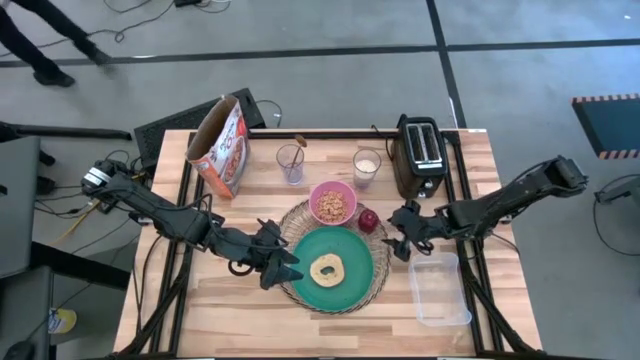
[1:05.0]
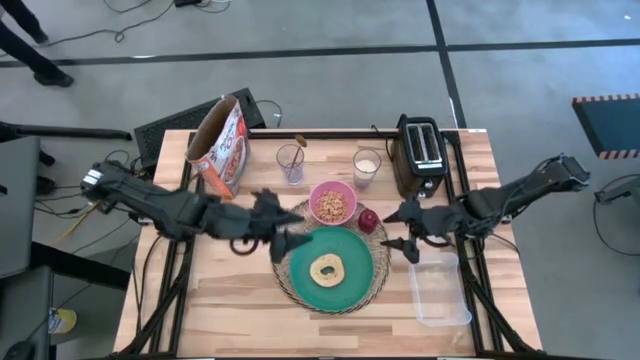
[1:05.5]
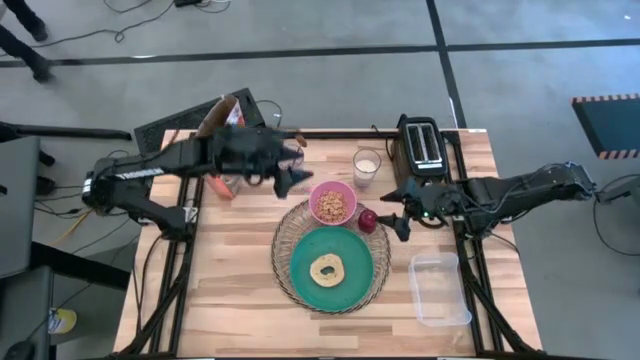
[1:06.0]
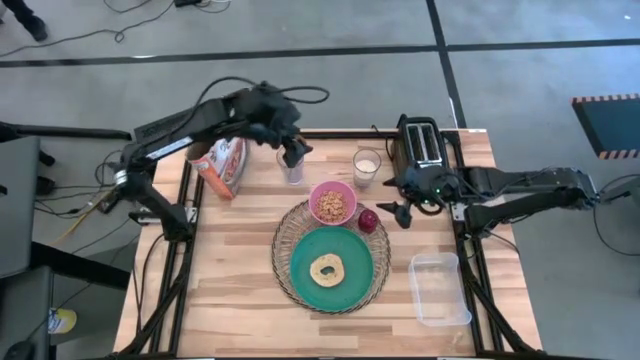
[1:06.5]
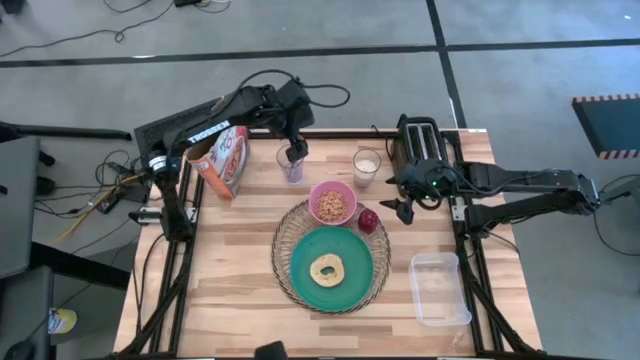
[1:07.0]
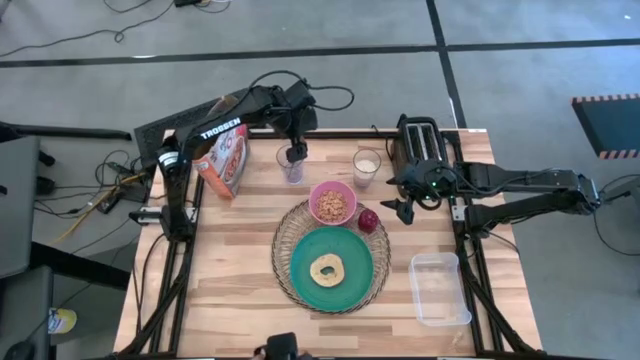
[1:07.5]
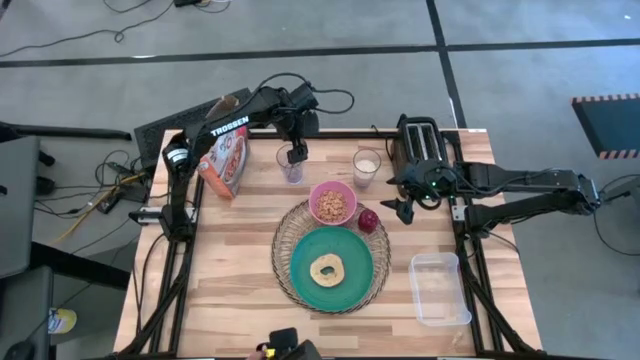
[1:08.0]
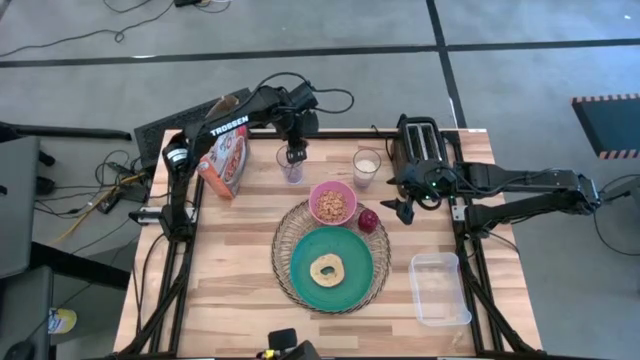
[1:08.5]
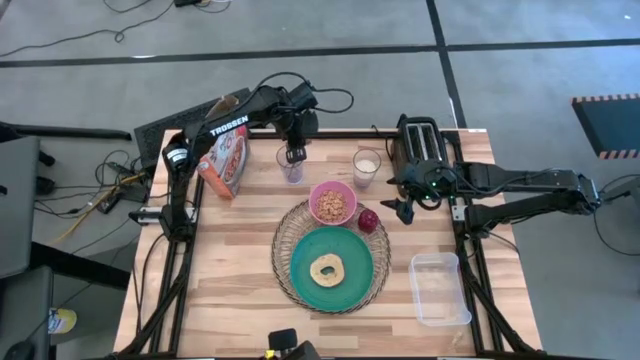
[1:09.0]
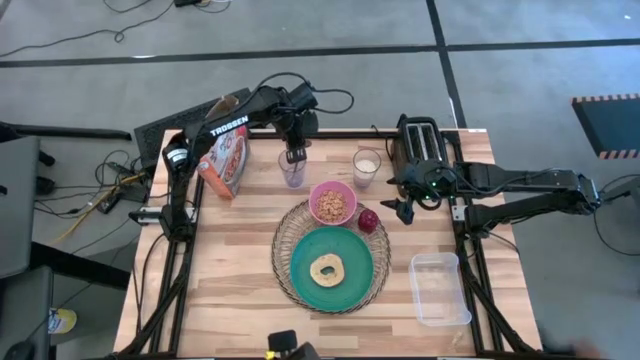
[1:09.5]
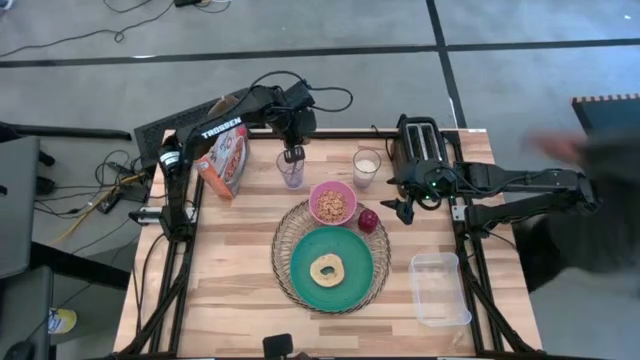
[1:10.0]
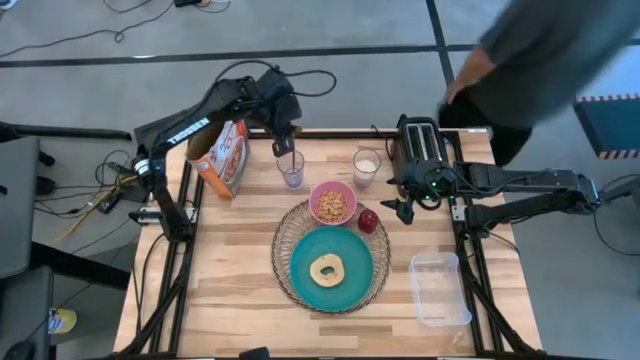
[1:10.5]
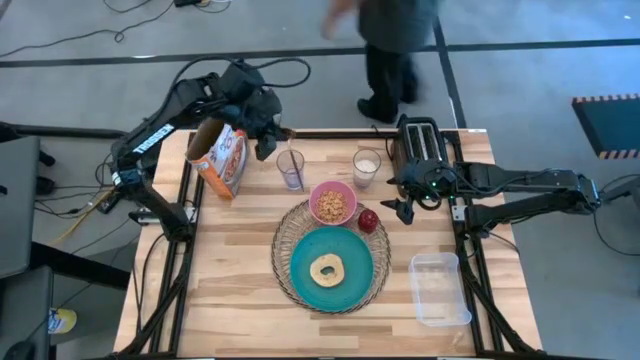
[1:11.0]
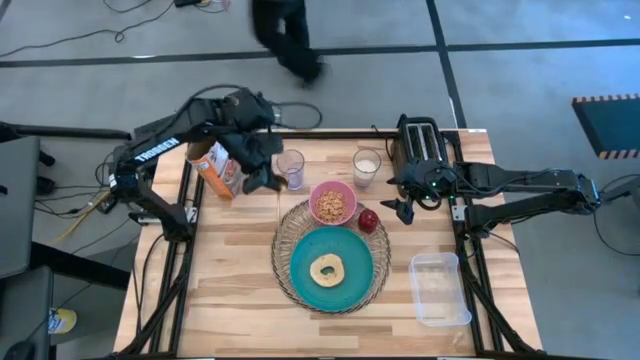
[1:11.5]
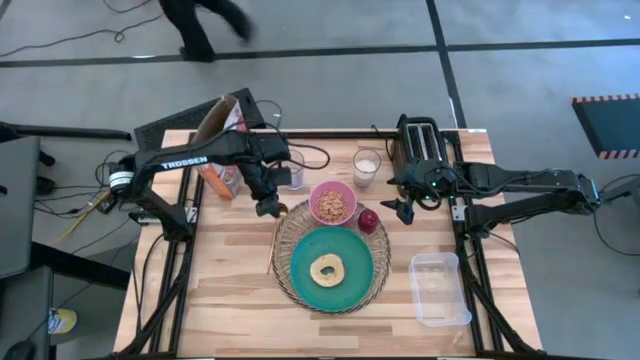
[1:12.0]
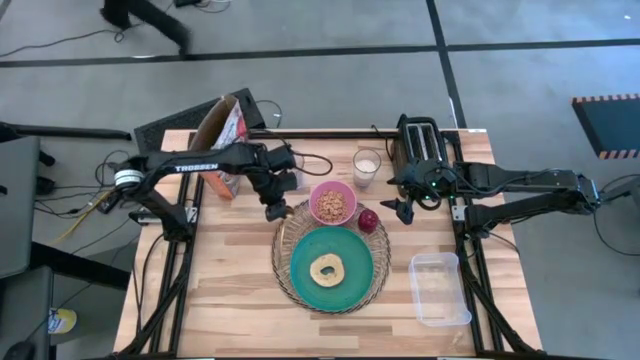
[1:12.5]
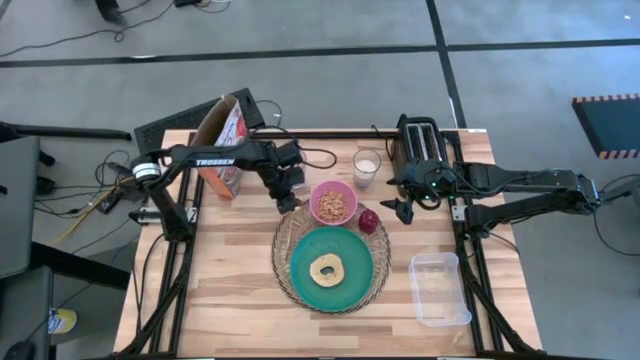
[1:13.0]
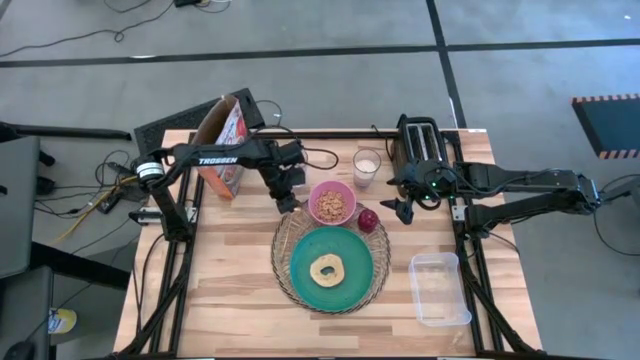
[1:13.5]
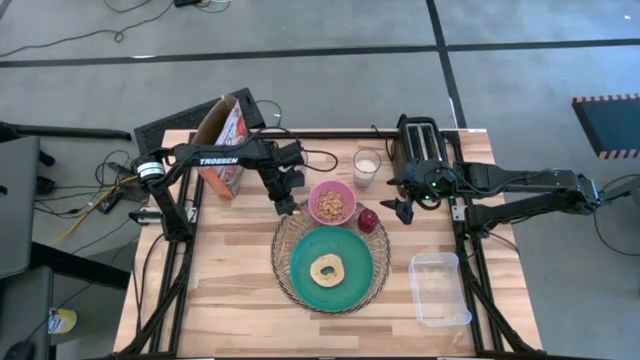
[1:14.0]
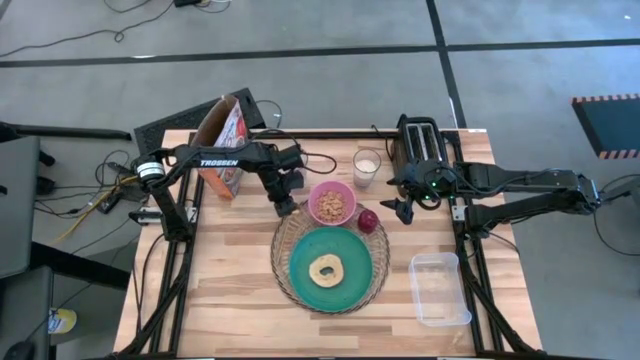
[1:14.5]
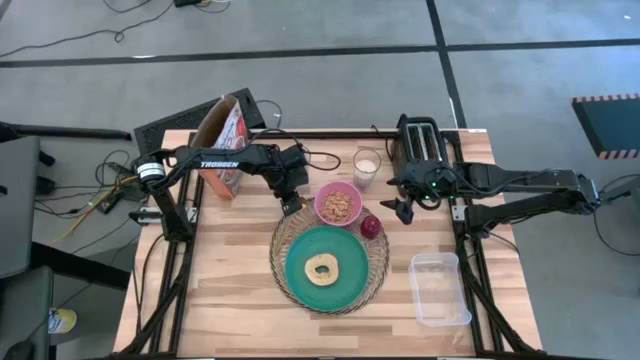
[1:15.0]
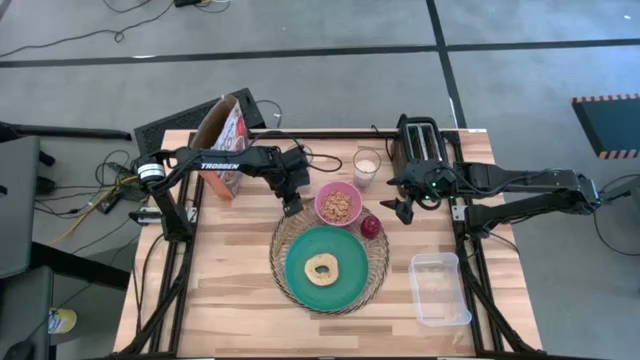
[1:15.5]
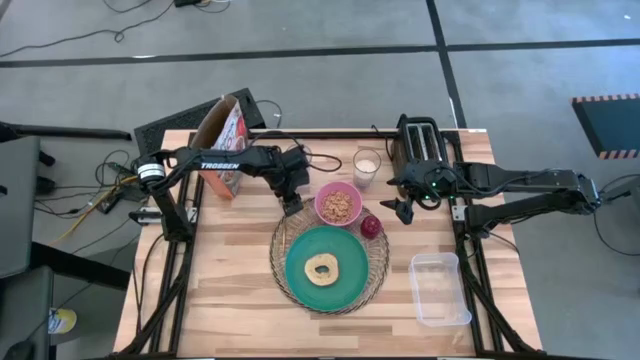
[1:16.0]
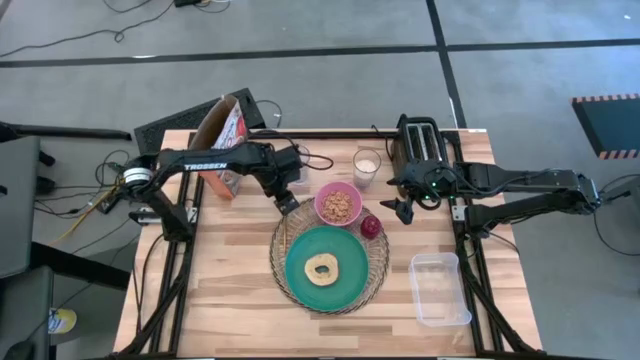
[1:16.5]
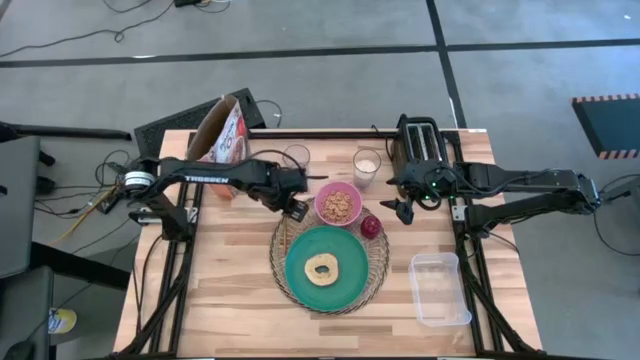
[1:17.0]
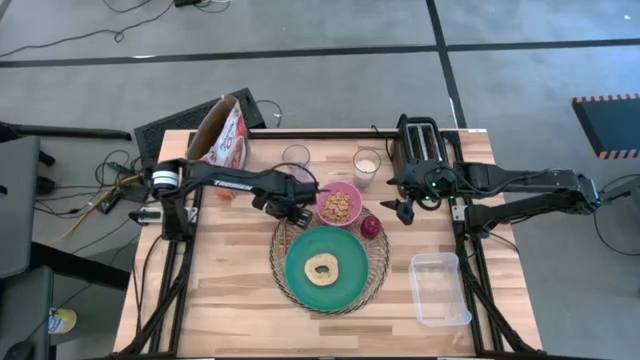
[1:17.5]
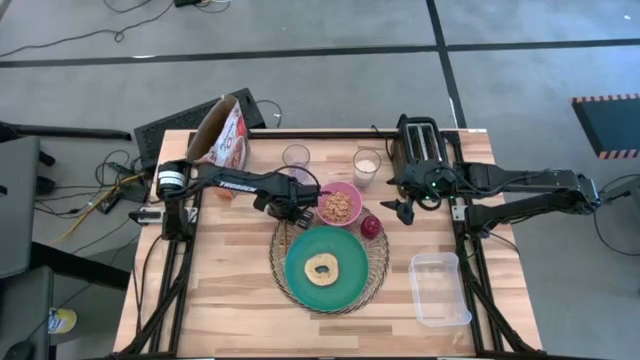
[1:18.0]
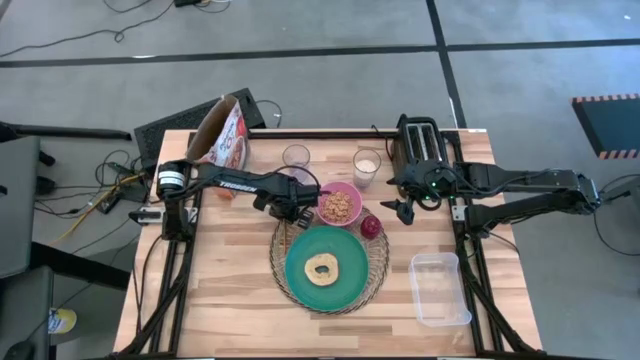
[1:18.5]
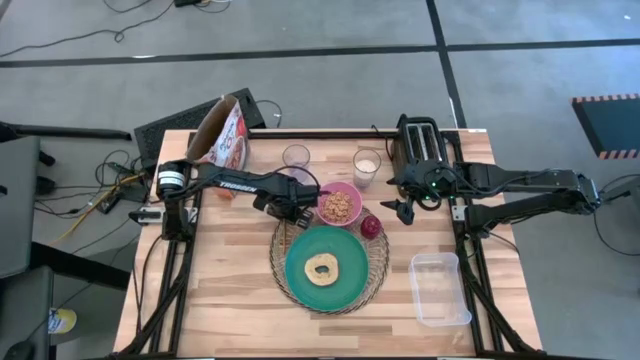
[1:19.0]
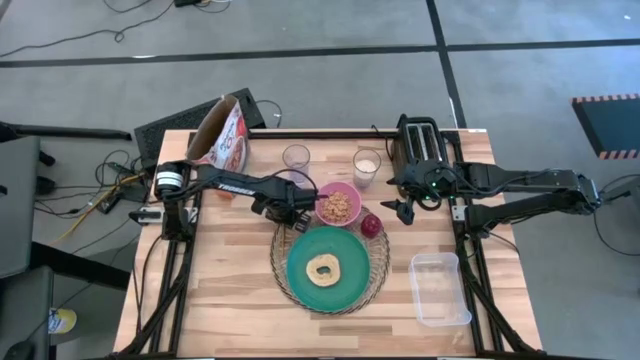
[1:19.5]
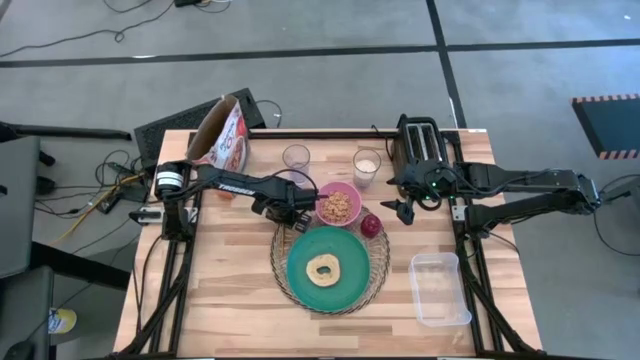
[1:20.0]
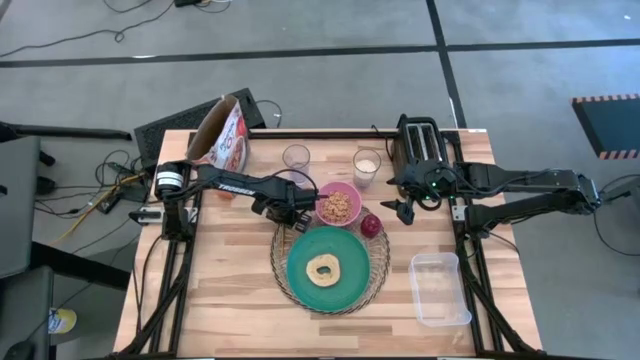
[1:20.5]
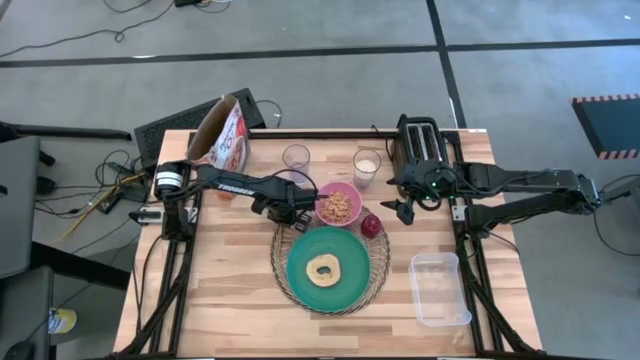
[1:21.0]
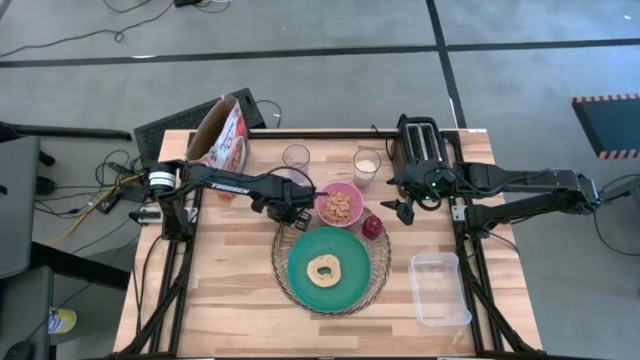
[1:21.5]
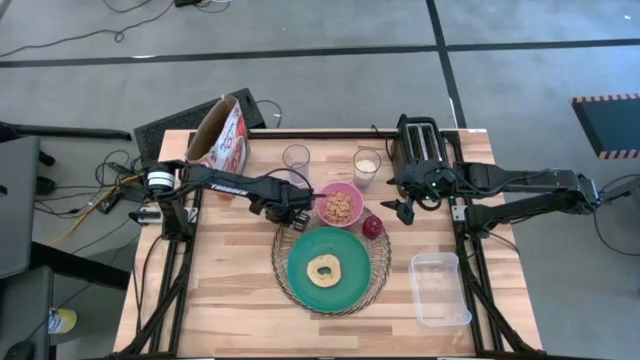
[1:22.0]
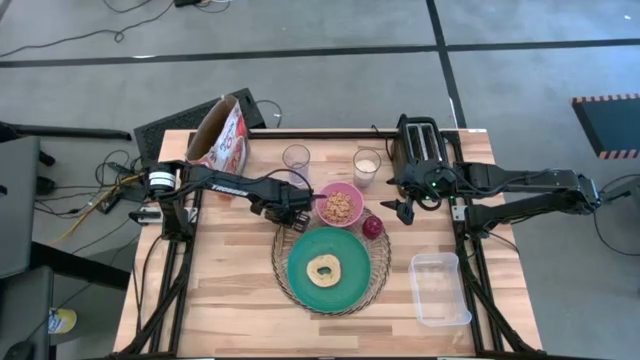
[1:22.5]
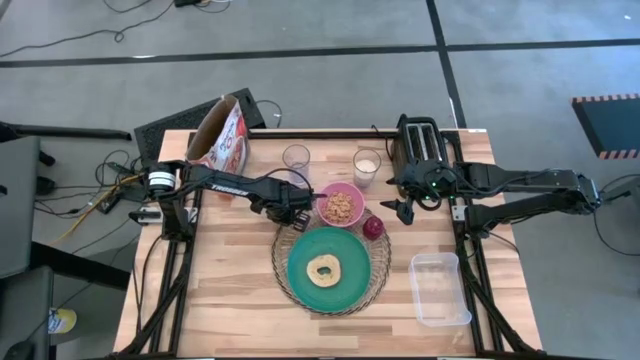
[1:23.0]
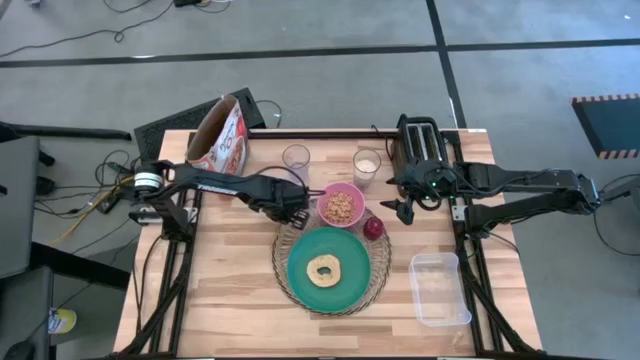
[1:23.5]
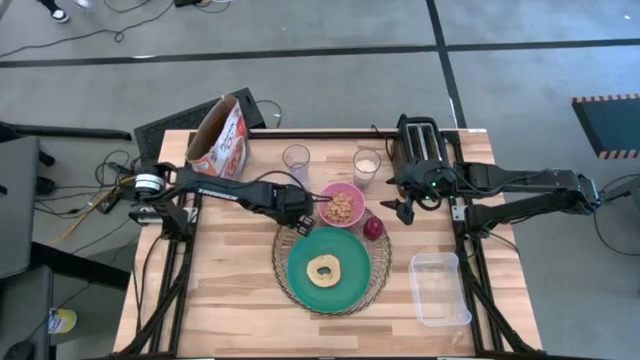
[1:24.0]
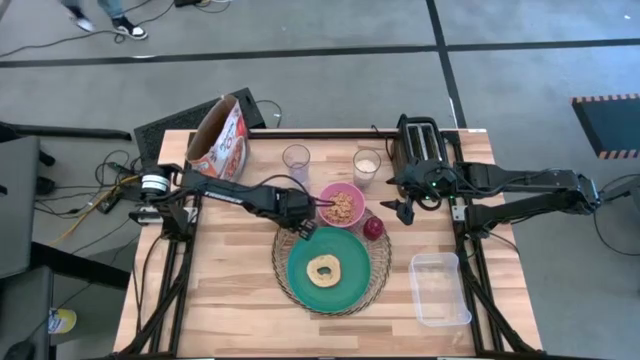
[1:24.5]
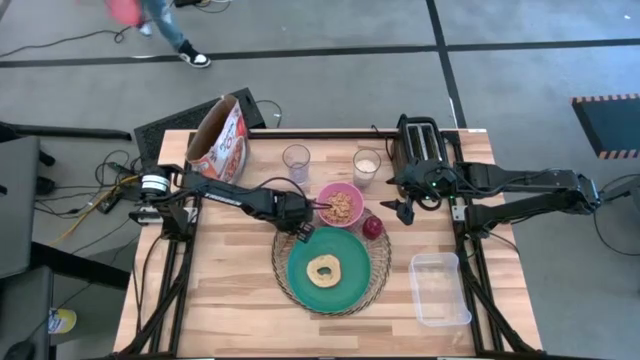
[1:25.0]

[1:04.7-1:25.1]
Task: Arrange a breakfast setting
Put the gold spoon to the left of the pink bowl

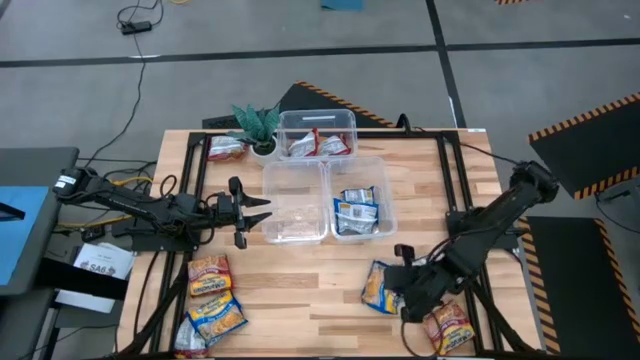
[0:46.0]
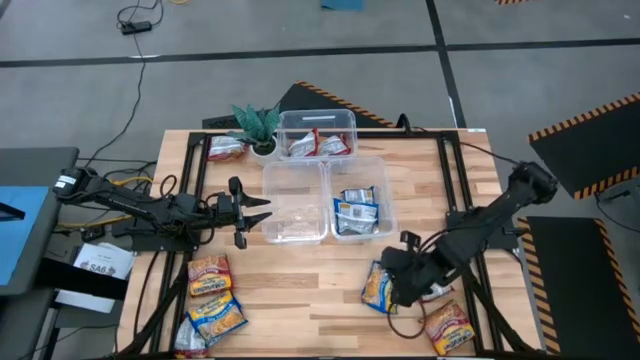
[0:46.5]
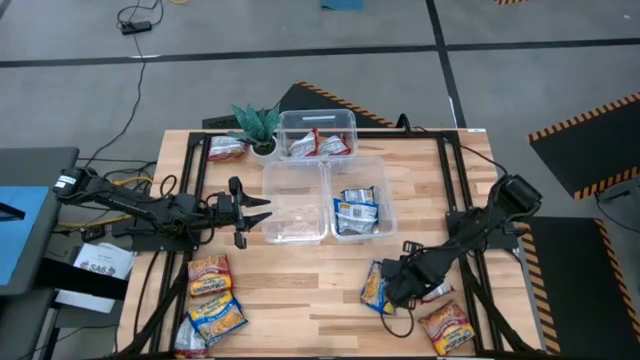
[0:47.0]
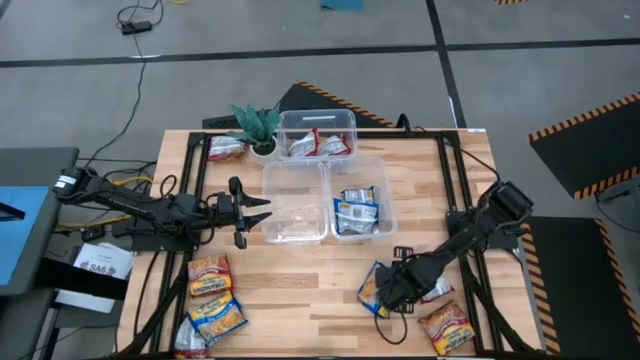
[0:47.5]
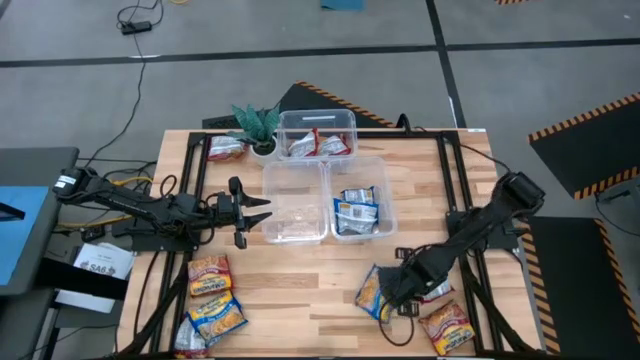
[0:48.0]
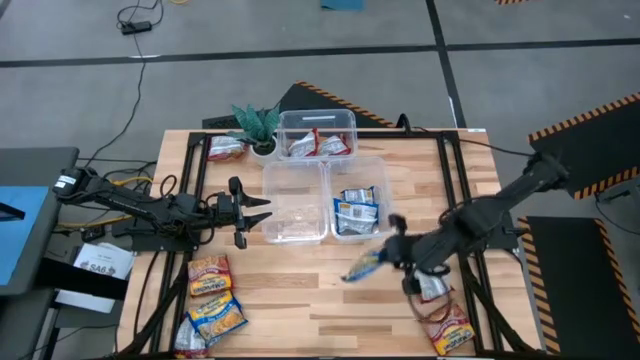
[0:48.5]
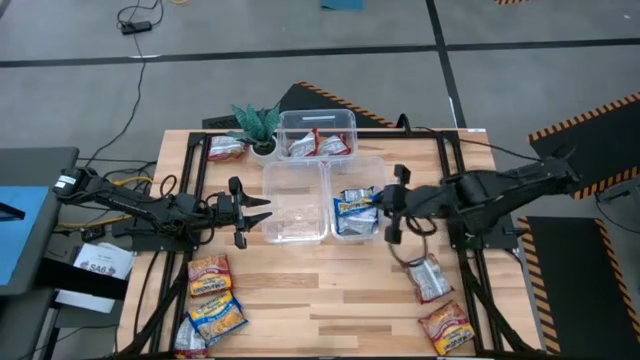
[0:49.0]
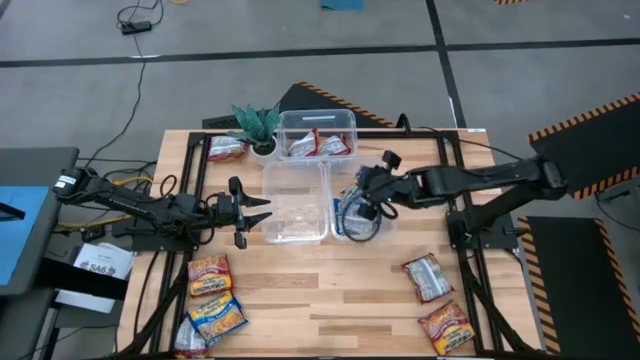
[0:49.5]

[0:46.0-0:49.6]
Task: Sort Maruchan noodles
Put the blue noodle pack into the bottom right transparent bin
